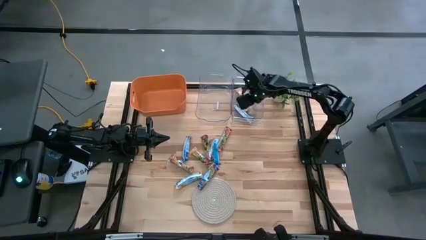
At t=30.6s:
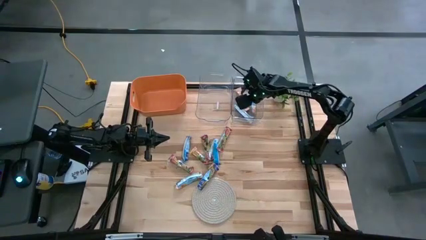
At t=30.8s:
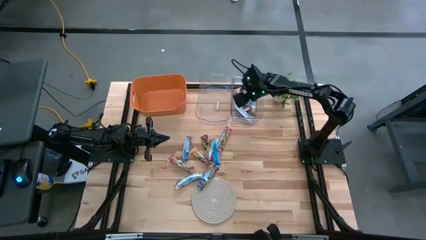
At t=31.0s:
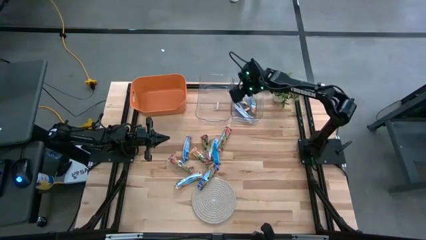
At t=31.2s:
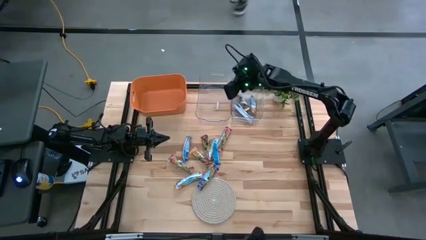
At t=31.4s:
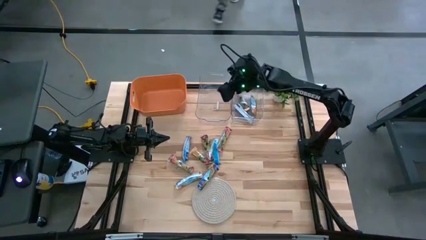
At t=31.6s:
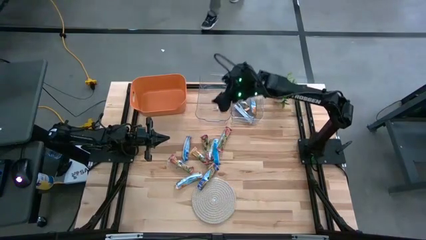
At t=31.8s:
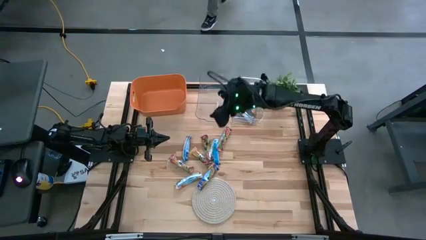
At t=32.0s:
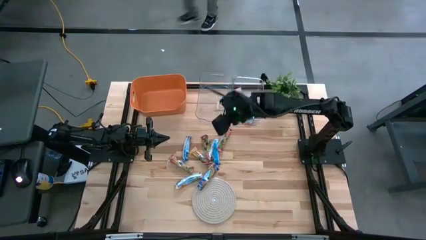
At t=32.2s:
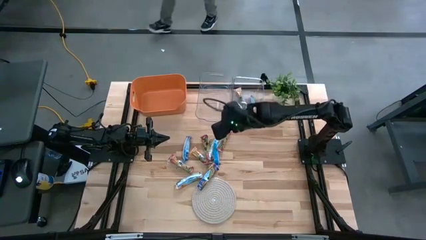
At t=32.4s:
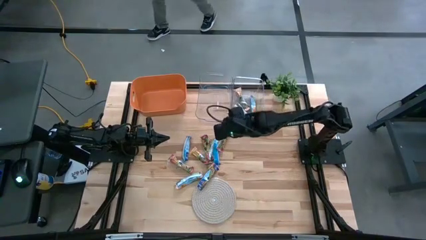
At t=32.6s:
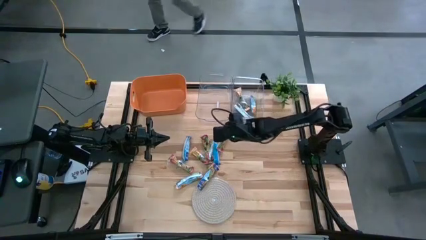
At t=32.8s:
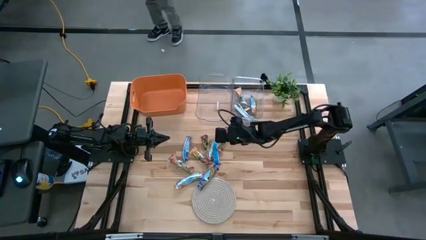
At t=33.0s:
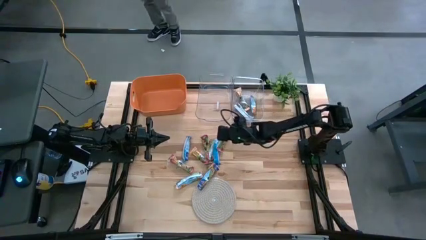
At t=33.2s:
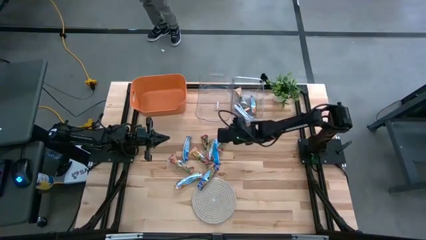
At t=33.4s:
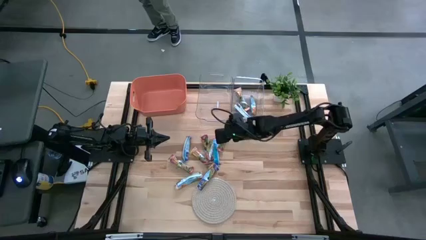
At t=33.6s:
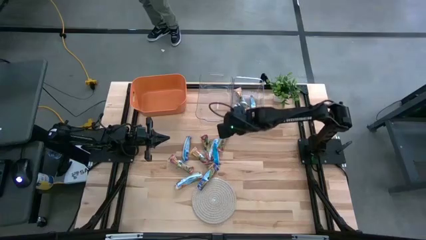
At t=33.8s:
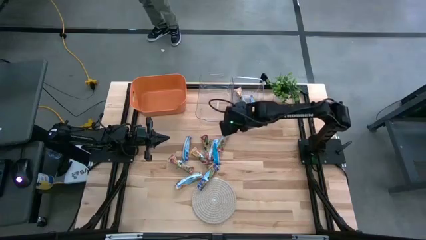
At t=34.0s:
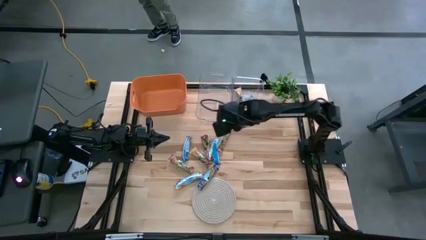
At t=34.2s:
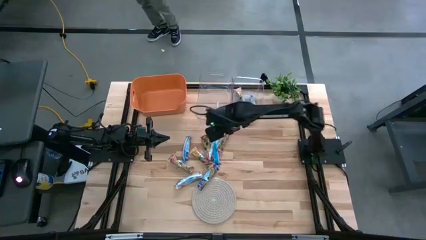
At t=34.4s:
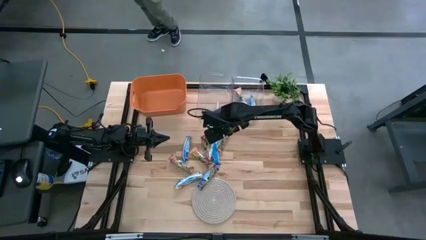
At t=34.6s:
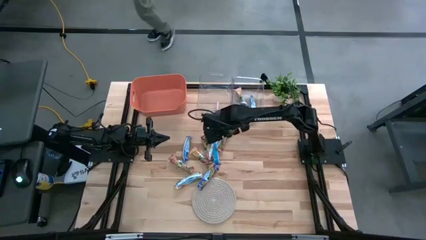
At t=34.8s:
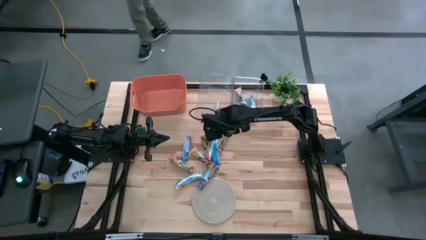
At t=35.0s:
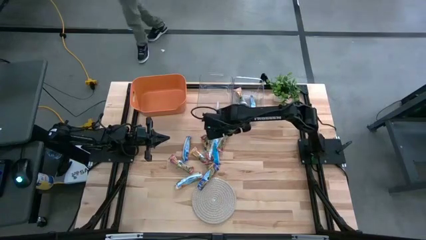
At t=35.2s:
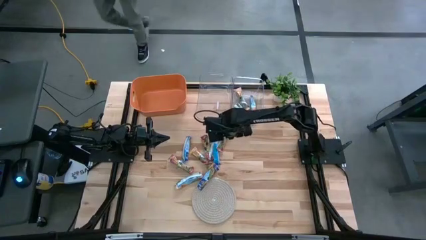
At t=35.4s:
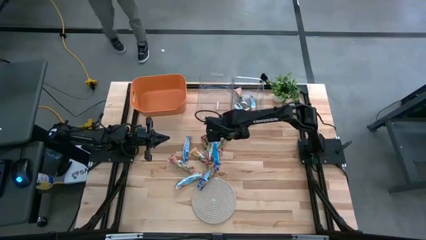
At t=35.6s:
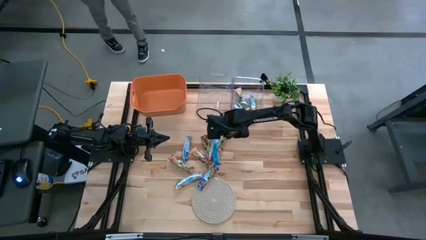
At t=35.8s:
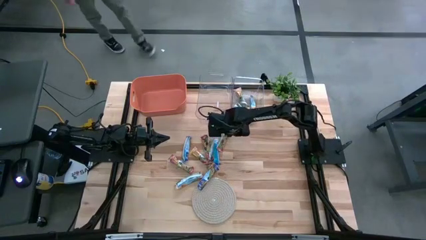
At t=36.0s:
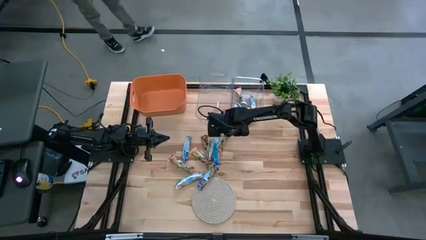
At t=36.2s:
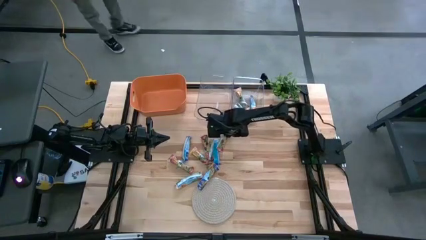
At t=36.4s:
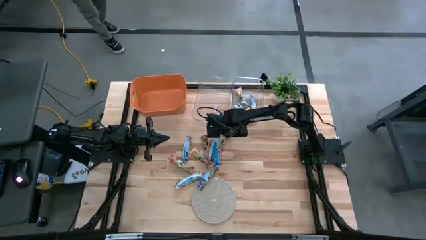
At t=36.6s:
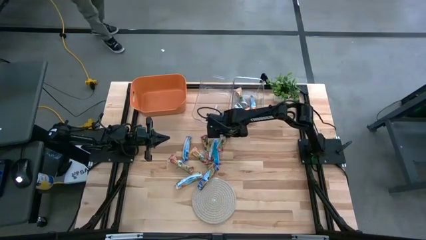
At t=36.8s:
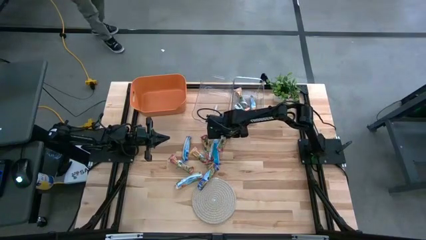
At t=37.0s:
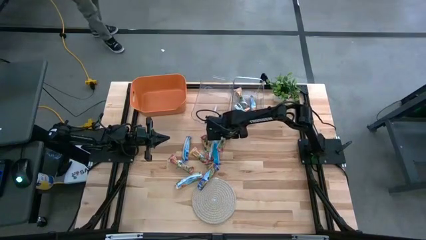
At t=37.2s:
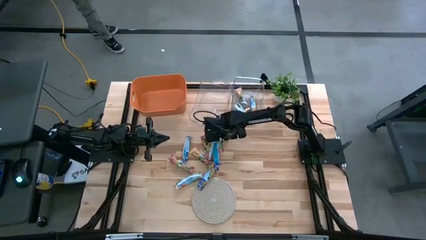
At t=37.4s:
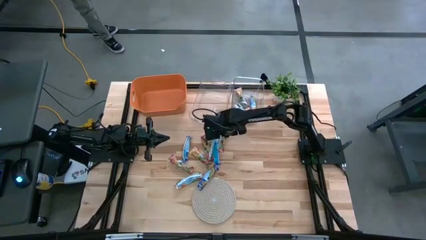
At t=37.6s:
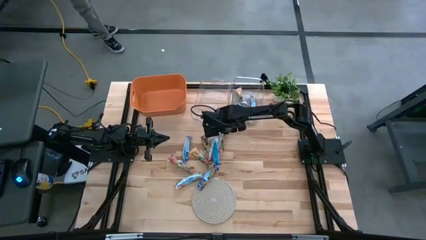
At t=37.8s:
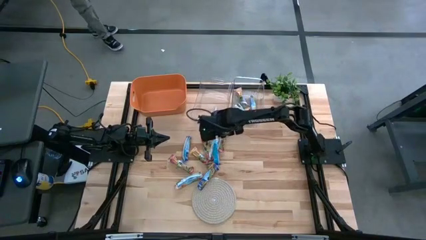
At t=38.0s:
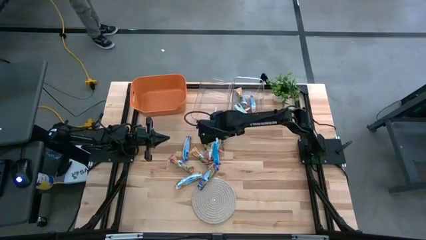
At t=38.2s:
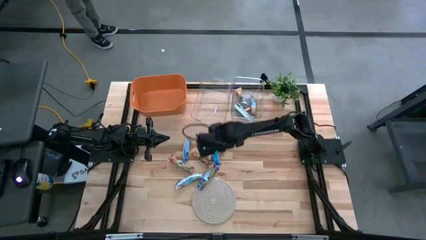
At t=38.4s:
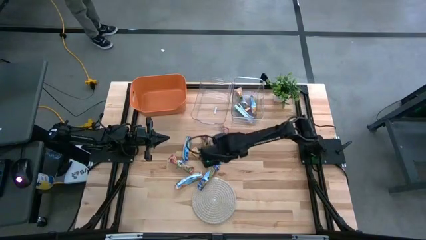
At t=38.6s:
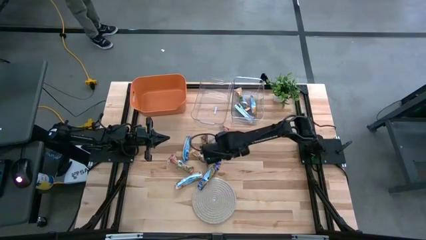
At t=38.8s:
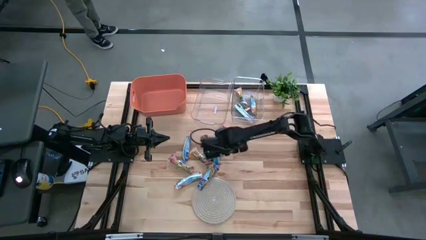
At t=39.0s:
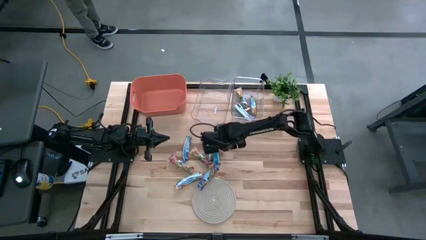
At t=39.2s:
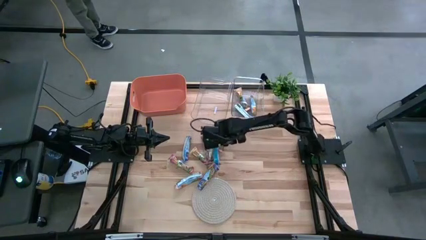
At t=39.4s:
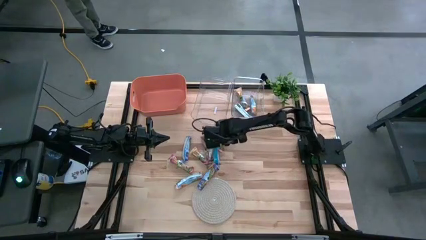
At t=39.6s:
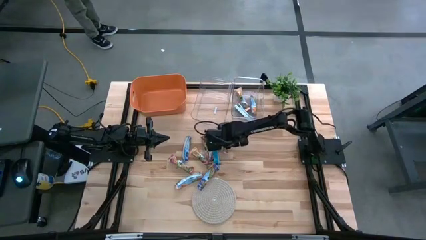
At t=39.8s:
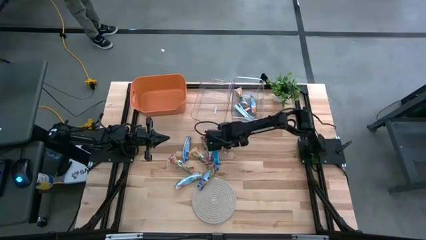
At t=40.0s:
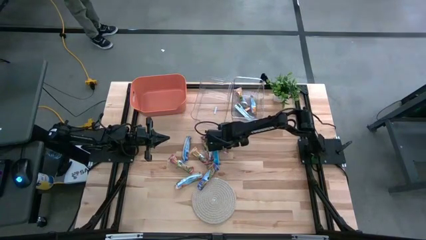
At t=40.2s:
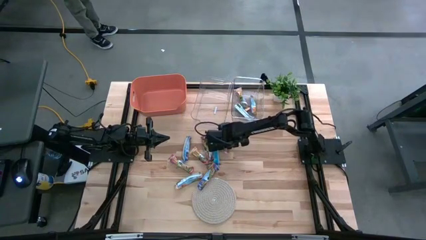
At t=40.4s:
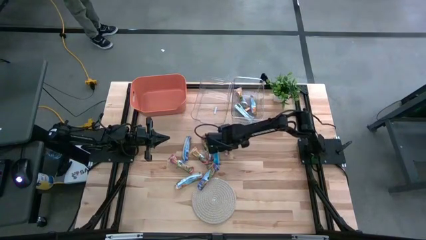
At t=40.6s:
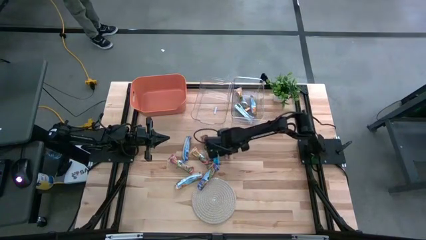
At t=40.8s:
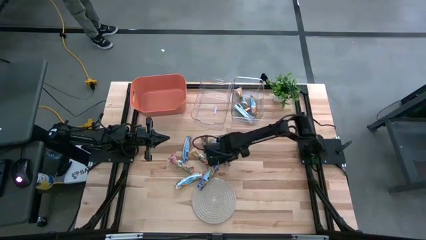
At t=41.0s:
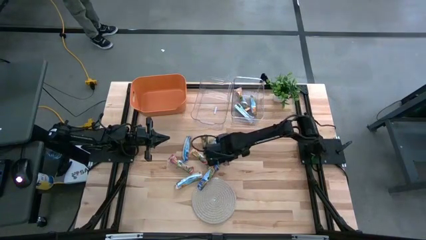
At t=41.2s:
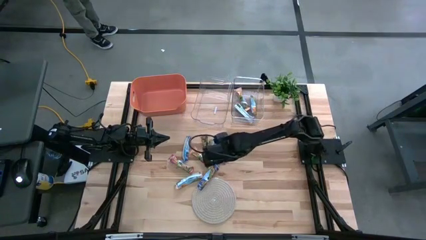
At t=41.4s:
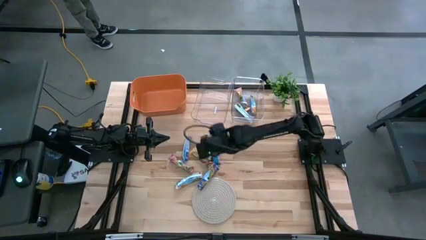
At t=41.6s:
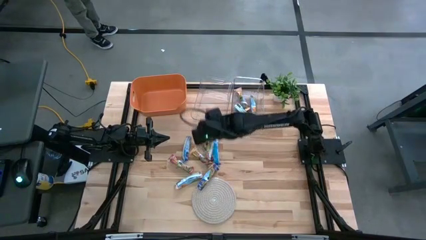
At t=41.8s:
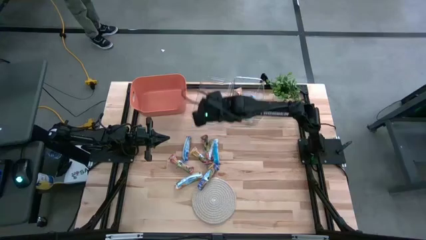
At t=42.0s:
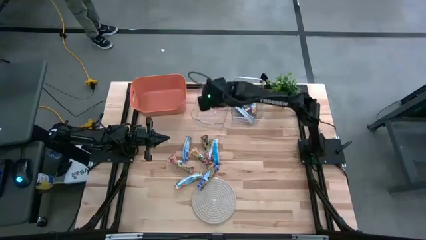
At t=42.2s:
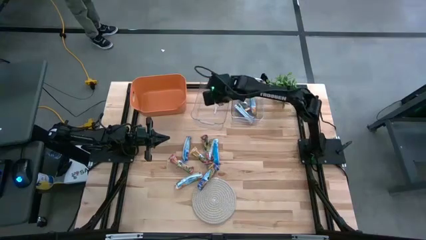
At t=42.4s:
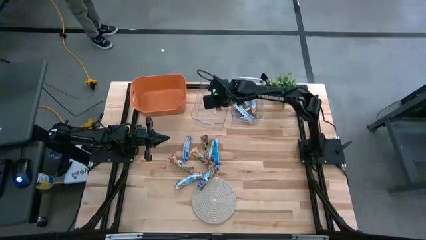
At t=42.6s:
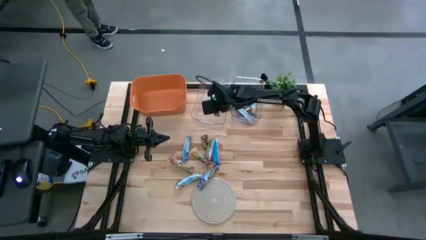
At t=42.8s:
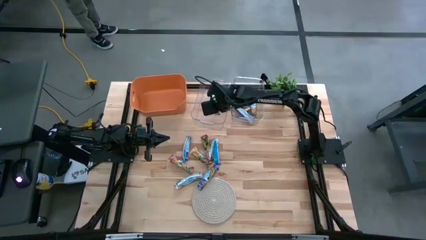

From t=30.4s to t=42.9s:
Task: Pick and place Granola Bars by type
Put the red granola bar into the left transparent bin
